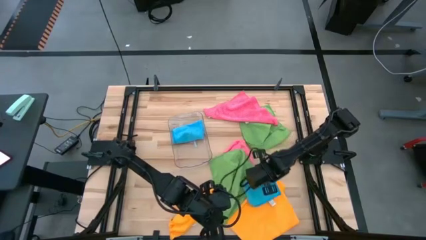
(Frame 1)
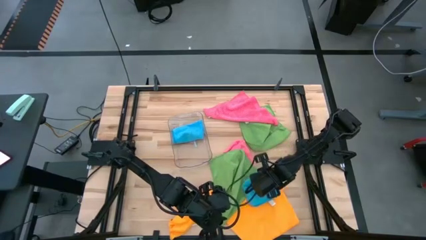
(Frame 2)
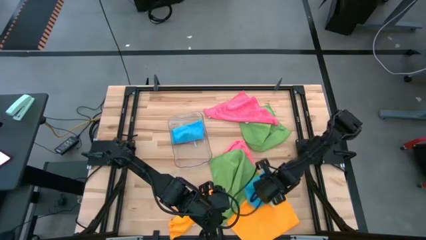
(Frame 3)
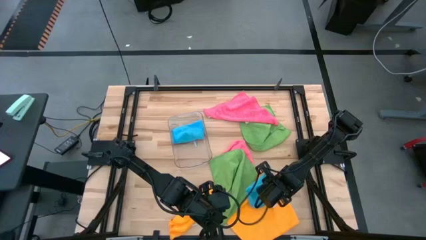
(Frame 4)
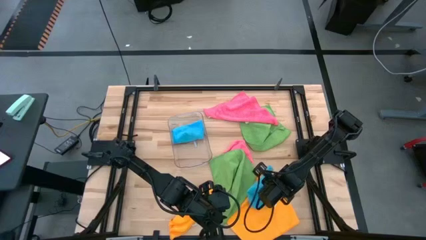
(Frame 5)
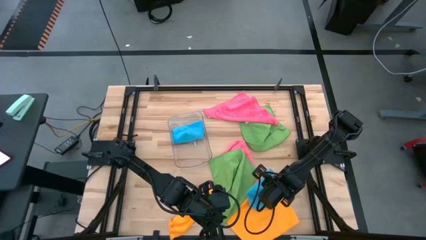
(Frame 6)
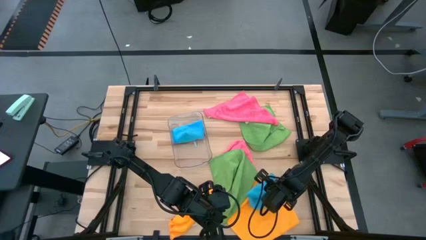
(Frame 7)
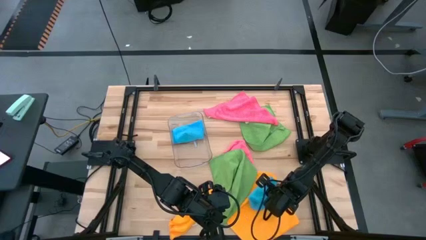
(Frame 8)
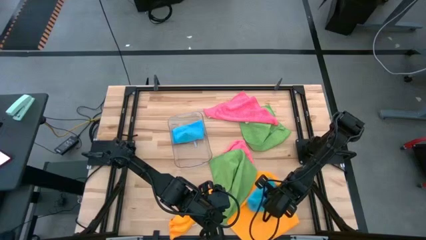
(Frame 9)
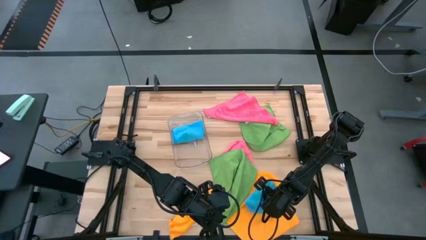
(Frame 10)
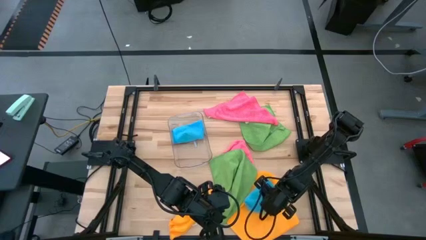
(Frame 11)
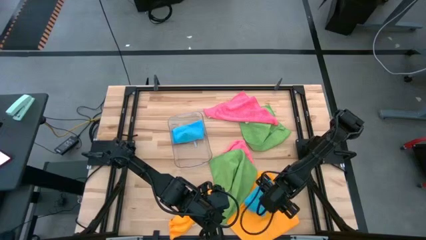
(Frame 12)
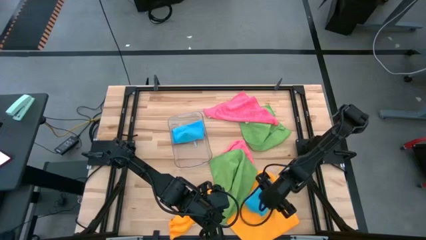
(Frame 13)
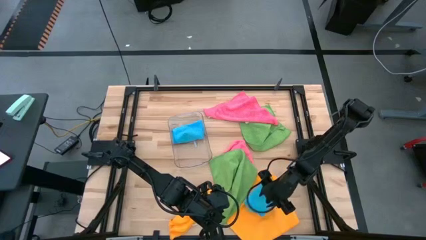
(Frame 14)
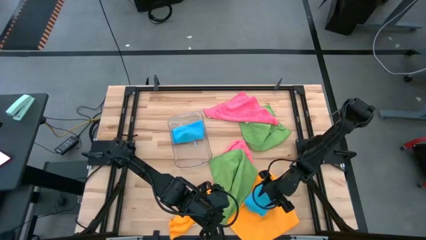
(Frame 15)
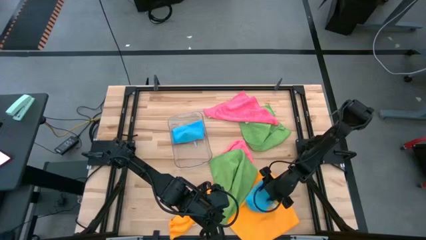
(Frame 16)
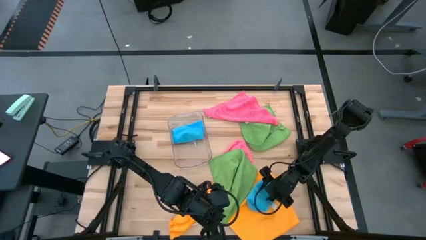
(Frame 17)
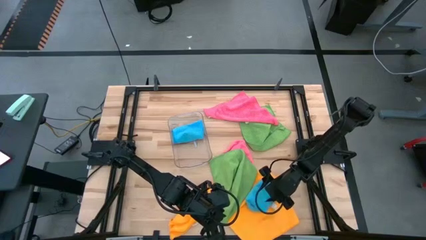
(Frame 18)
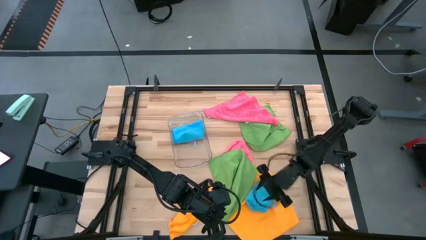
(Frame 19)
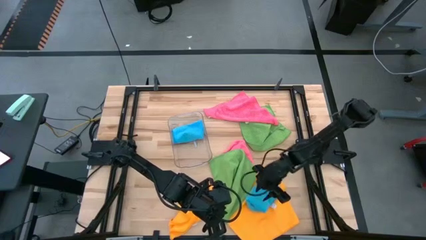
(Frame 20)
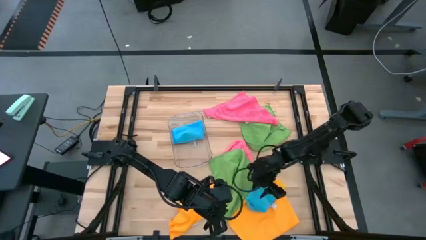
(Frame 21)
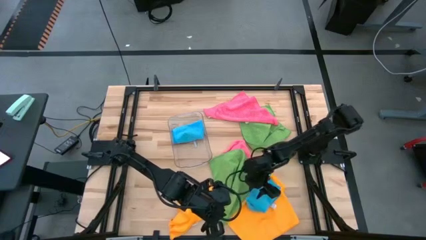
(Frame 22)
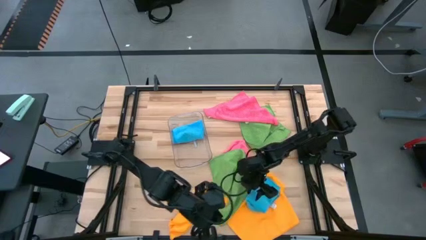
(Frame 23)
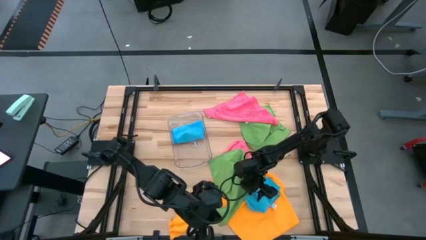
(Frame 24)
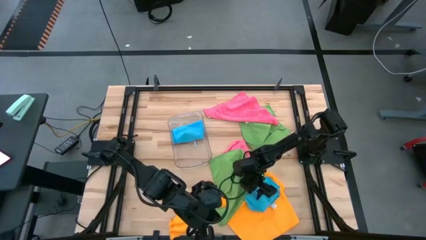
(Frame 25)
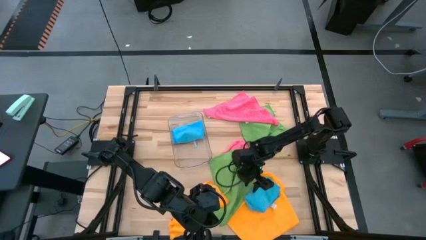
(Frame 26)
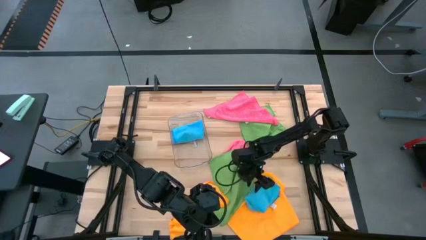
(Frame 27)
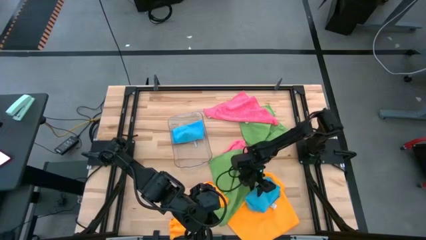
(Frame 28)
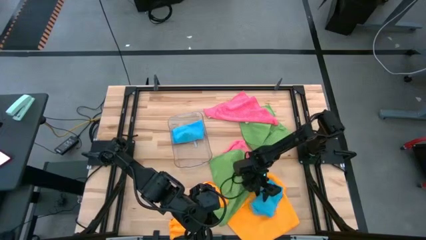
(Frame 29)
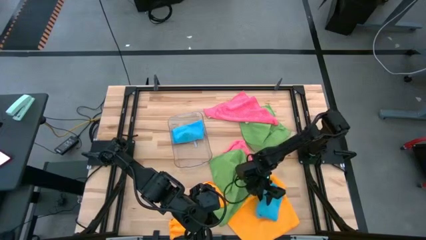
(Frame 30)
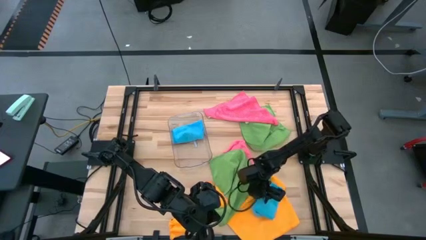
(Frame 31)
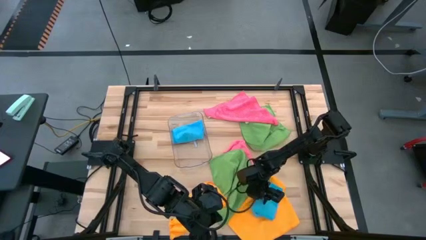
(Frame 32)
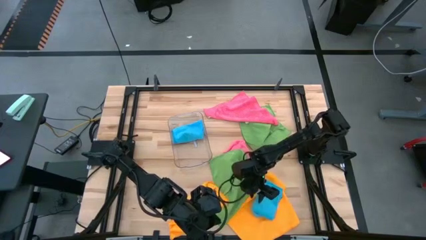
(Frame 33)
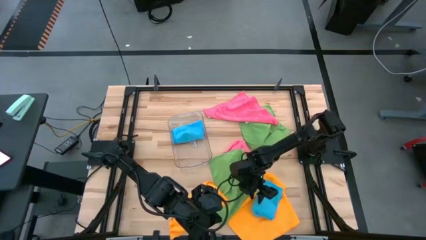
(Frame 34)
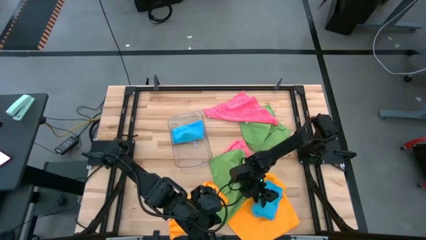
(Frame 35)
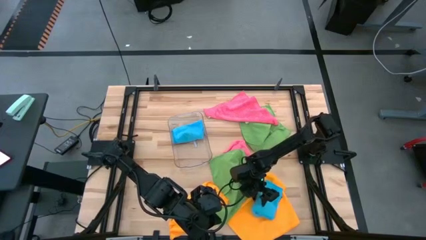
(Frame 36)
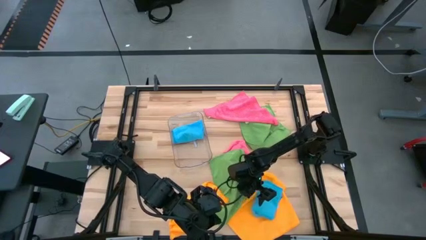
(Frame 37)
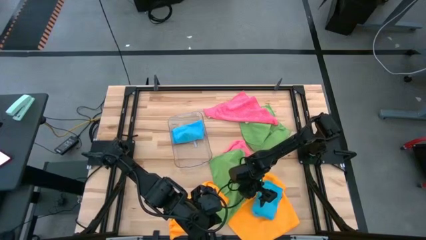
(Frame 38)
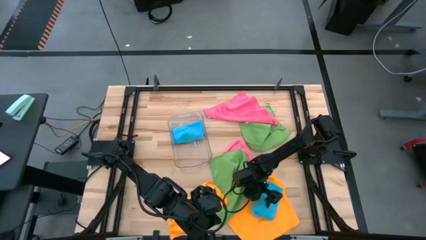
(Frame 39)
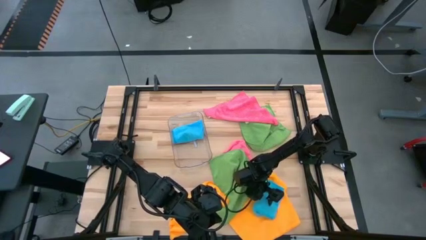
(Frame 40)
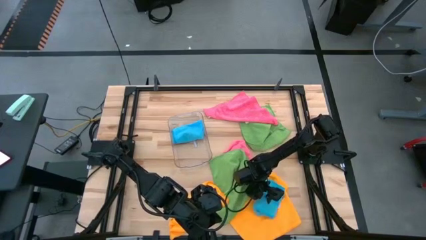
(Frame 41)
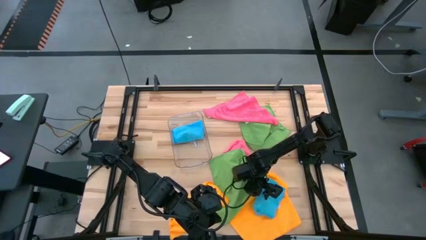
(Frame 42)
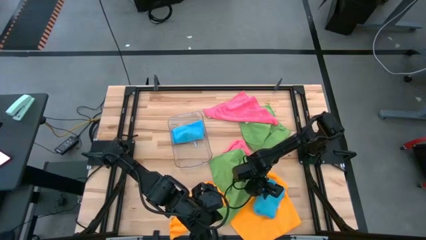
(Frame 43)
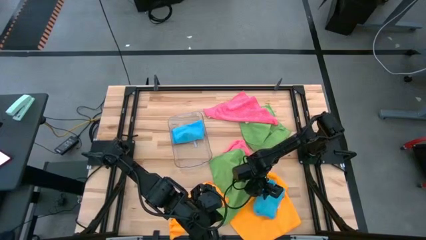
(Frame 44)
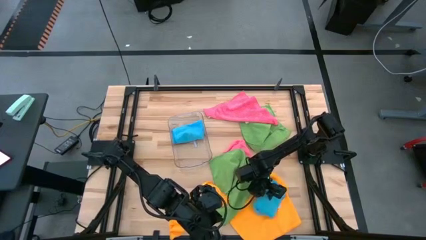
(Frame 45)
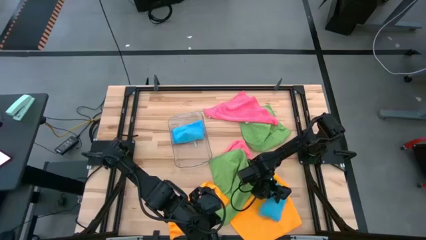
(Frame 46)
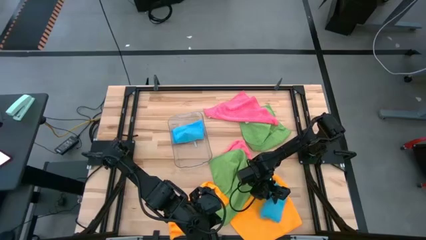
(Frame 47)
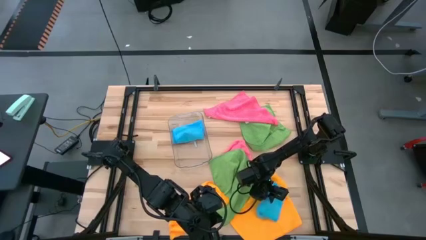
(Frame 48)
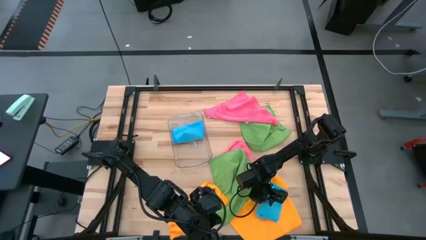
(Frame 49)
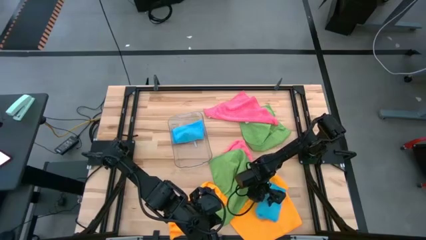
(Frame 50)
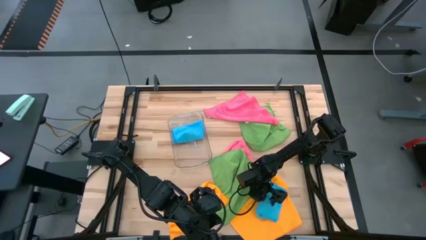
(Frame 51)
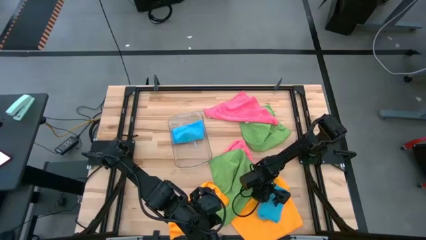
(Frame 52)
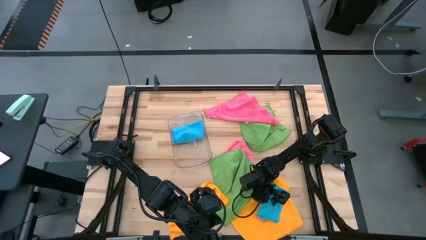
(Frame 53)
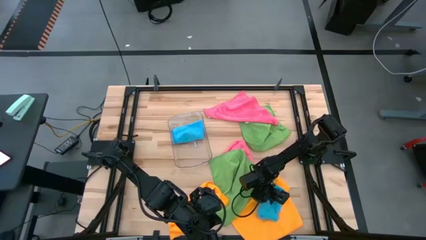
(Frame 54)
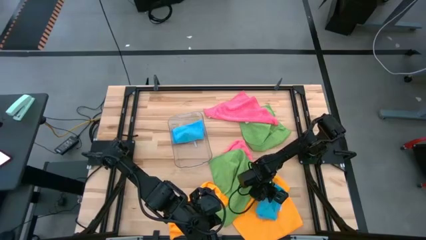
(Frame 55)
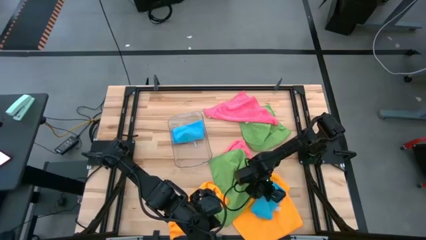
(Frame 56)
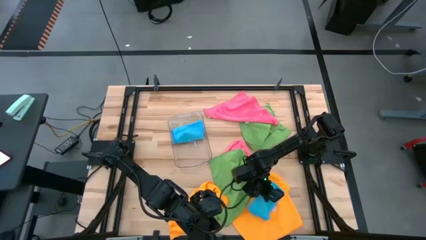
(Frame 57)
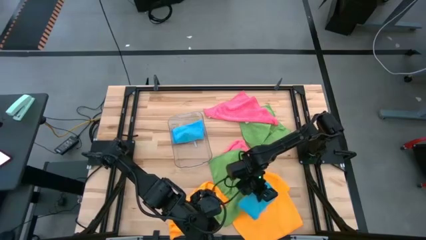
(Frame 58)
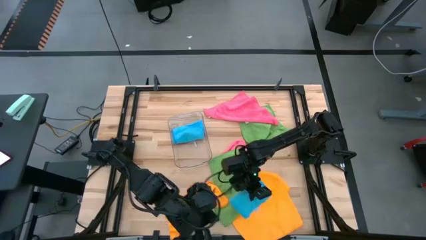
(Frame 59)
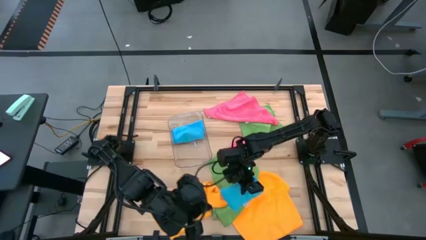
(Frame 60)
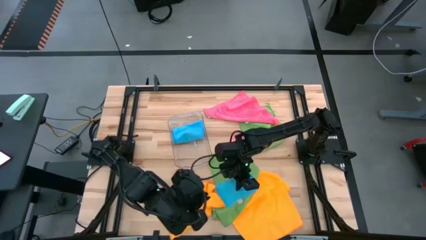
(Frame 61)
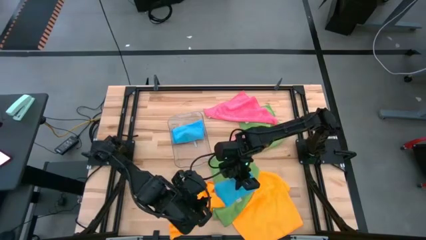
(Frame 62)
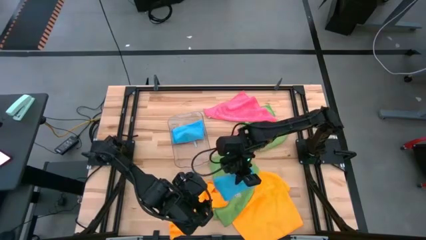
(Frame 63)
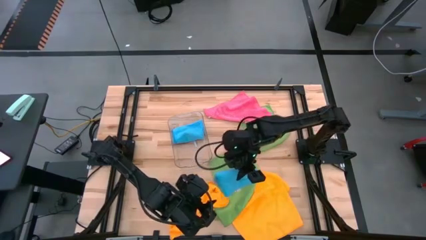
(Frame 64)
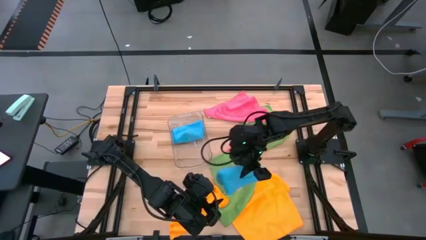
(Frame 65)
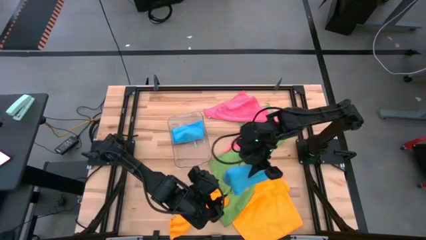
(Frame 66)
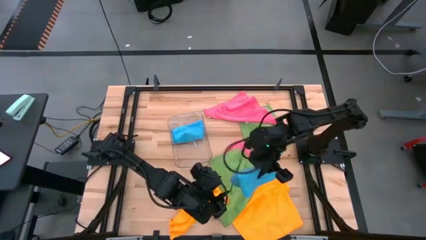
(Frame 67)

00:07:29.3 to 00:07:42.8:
Task: Fold microfiber towels
Fold the blue towel
